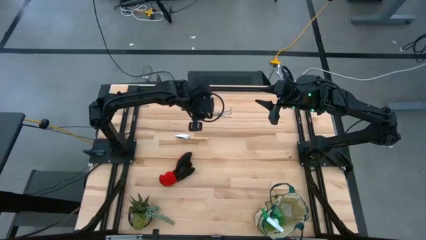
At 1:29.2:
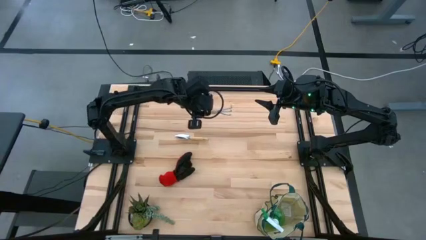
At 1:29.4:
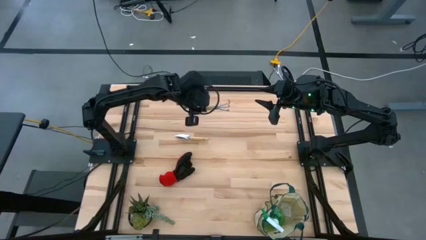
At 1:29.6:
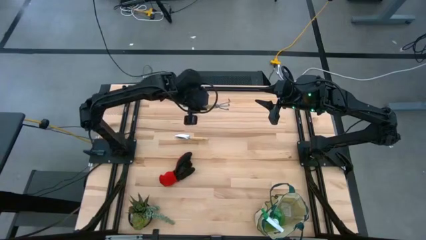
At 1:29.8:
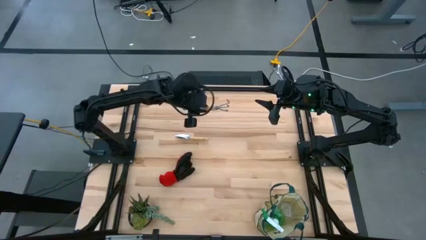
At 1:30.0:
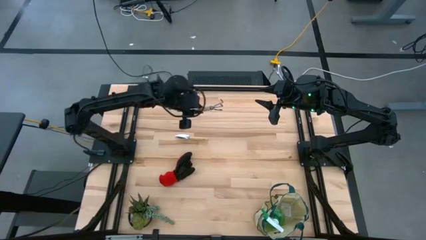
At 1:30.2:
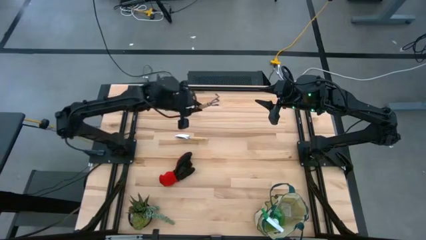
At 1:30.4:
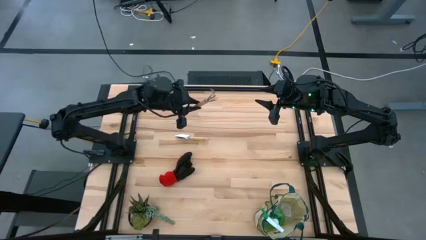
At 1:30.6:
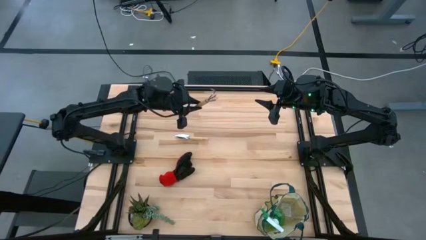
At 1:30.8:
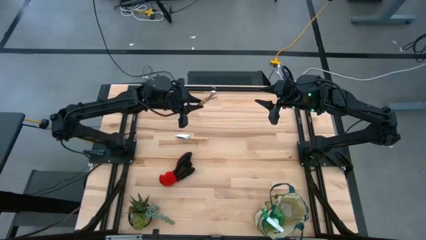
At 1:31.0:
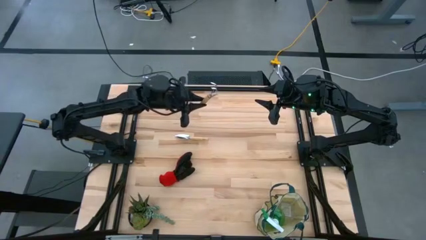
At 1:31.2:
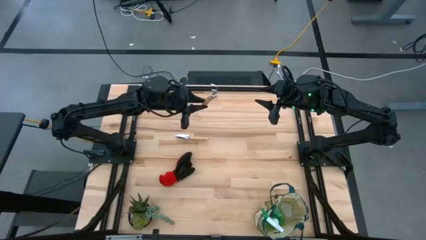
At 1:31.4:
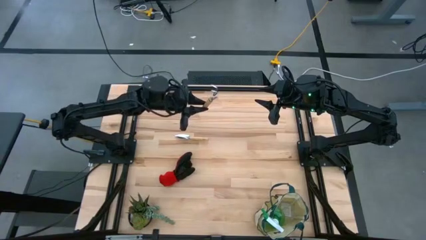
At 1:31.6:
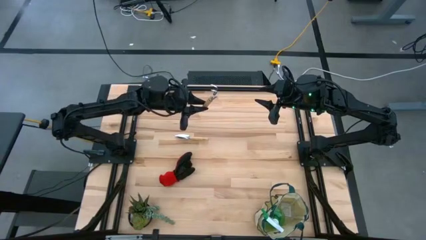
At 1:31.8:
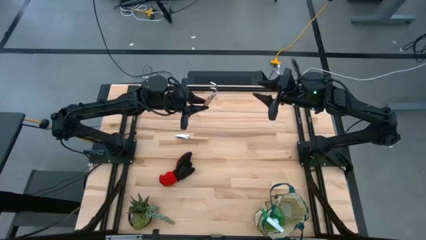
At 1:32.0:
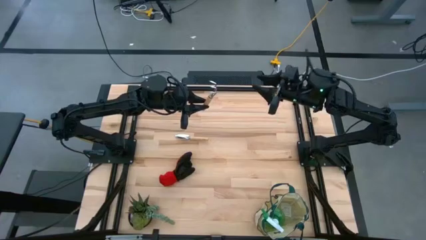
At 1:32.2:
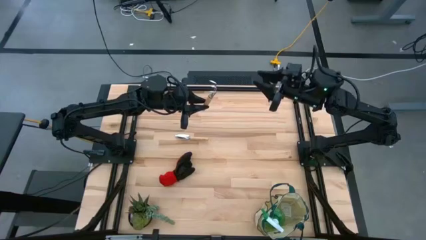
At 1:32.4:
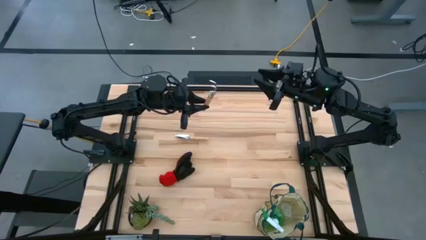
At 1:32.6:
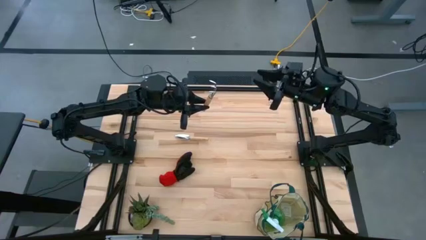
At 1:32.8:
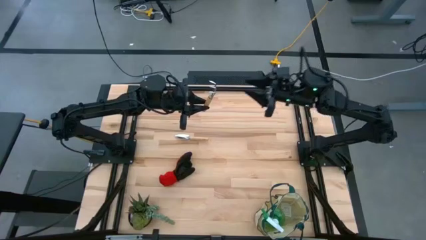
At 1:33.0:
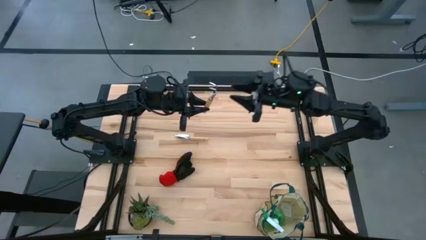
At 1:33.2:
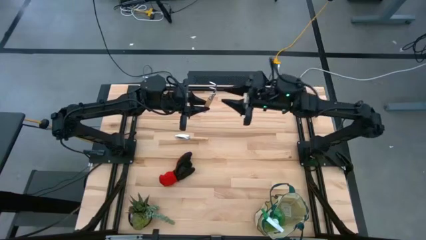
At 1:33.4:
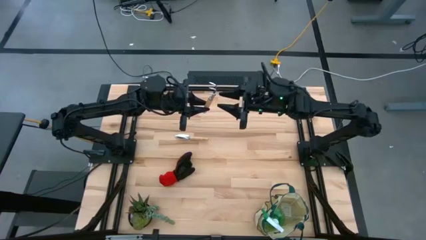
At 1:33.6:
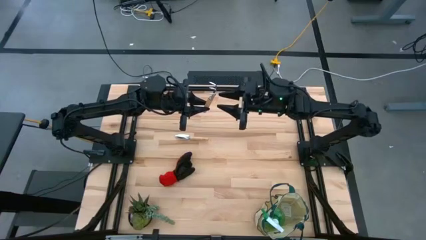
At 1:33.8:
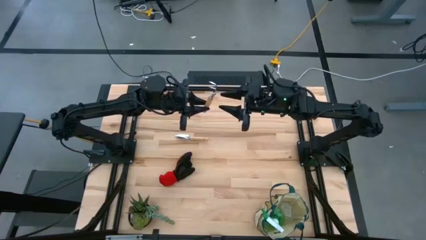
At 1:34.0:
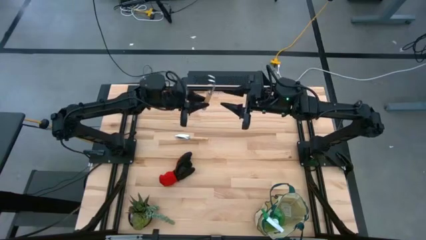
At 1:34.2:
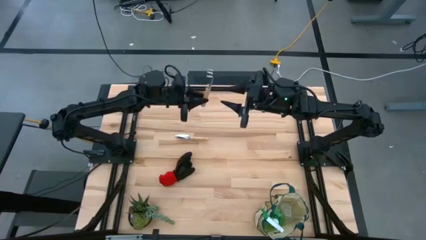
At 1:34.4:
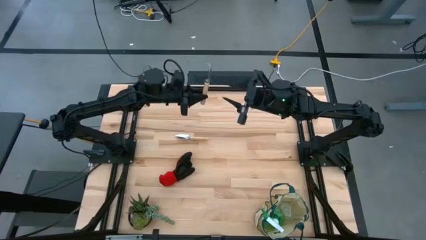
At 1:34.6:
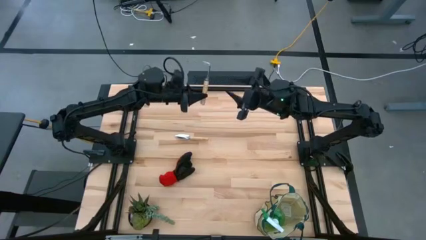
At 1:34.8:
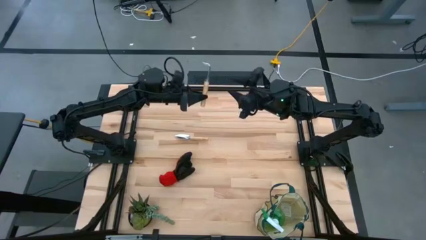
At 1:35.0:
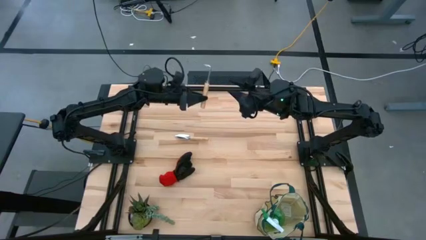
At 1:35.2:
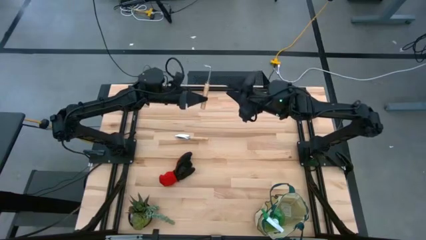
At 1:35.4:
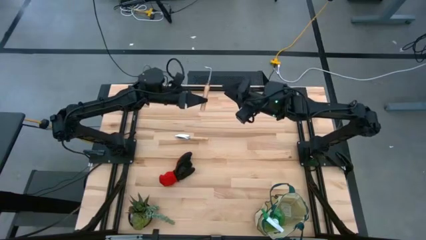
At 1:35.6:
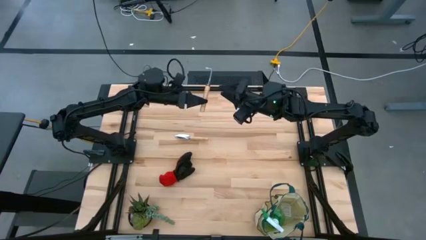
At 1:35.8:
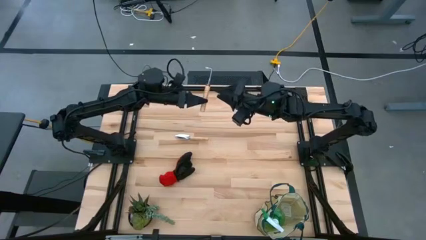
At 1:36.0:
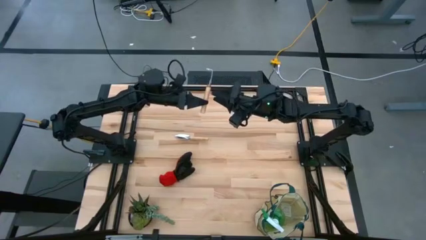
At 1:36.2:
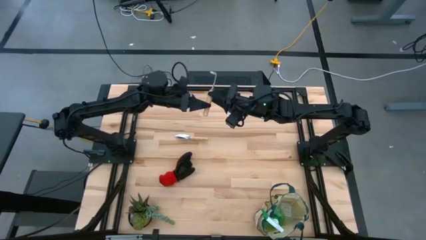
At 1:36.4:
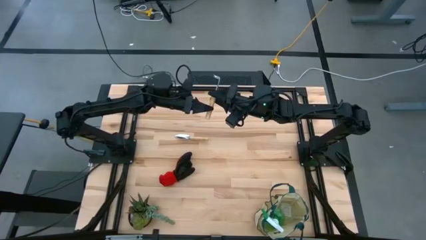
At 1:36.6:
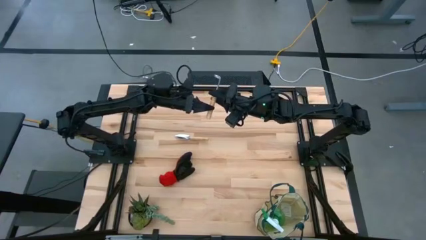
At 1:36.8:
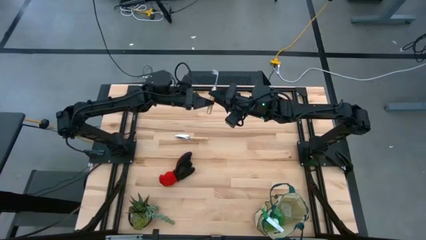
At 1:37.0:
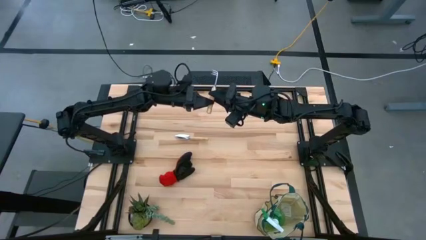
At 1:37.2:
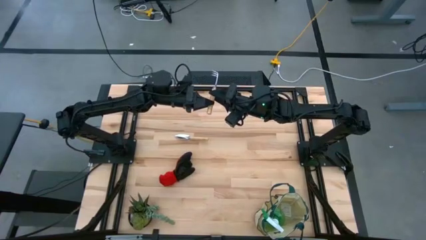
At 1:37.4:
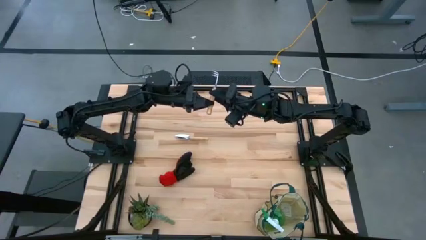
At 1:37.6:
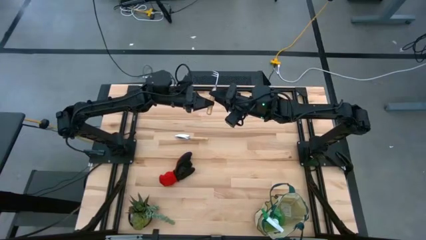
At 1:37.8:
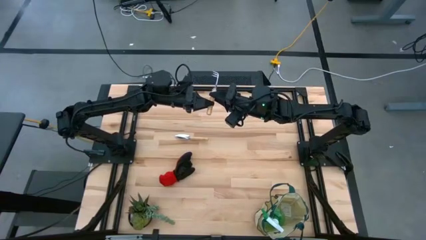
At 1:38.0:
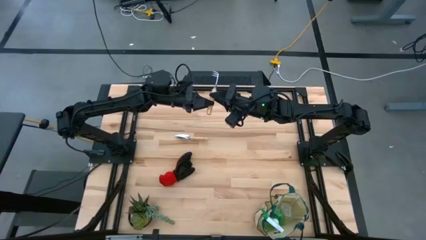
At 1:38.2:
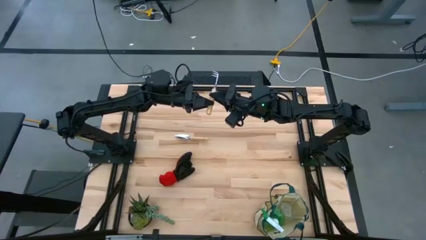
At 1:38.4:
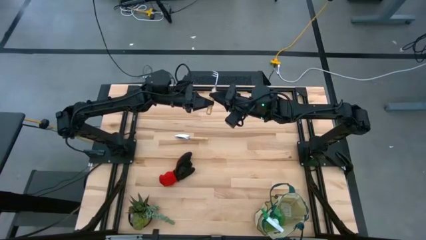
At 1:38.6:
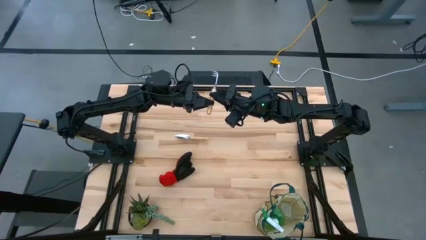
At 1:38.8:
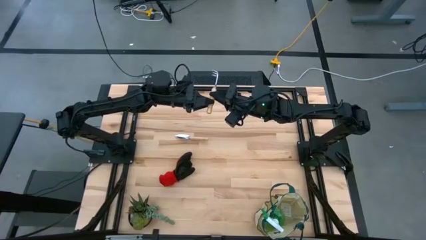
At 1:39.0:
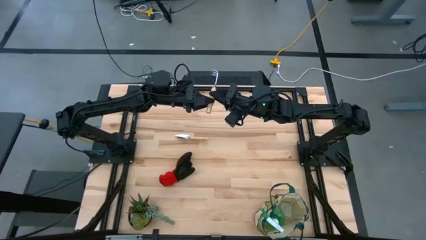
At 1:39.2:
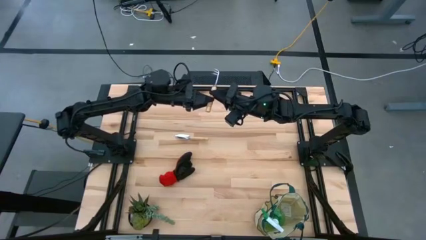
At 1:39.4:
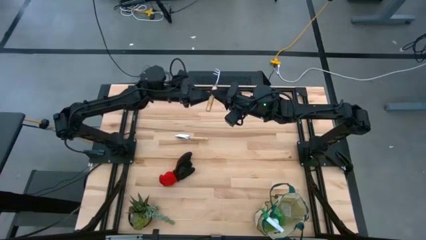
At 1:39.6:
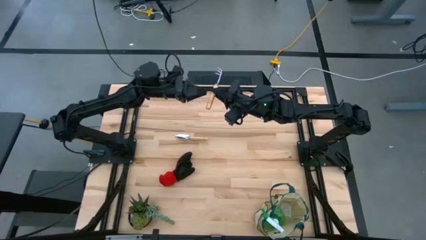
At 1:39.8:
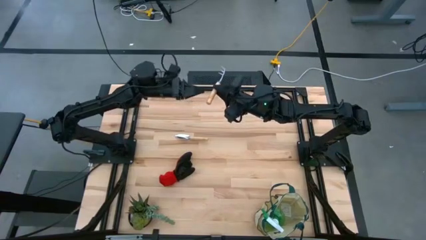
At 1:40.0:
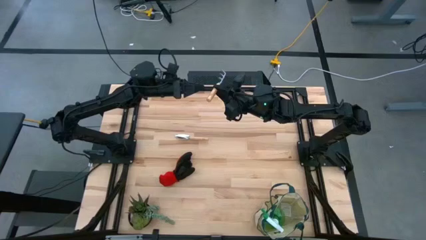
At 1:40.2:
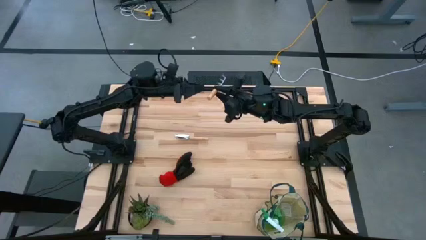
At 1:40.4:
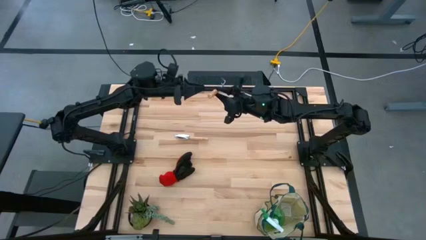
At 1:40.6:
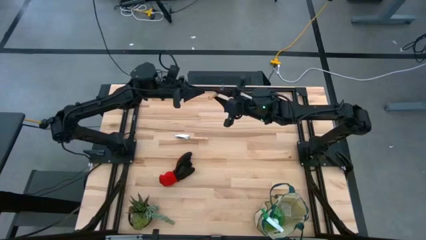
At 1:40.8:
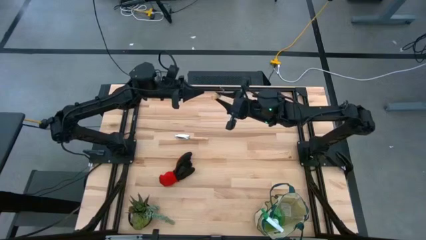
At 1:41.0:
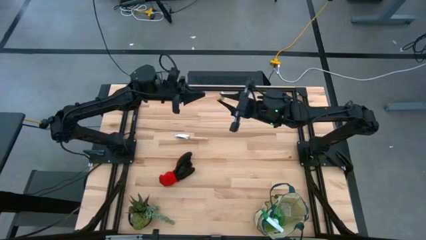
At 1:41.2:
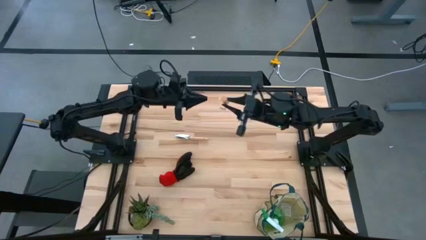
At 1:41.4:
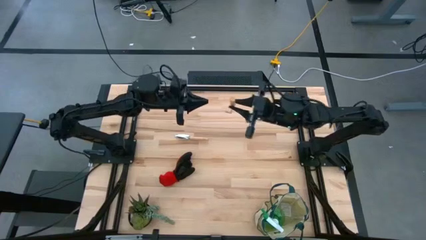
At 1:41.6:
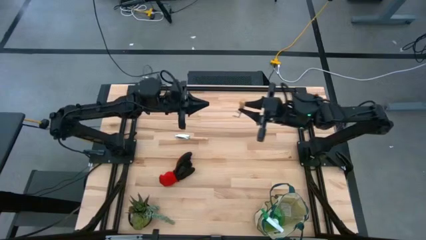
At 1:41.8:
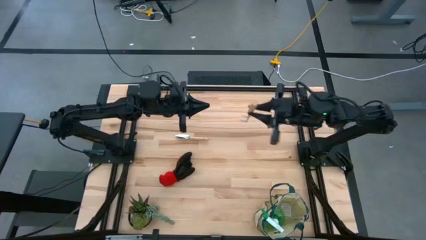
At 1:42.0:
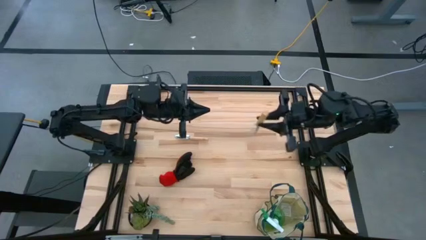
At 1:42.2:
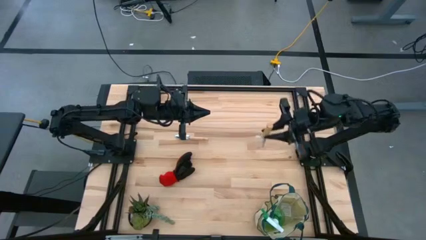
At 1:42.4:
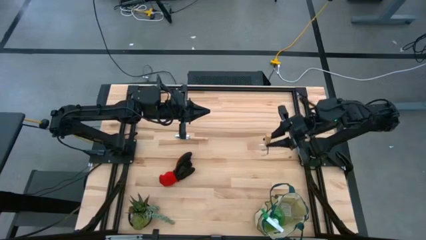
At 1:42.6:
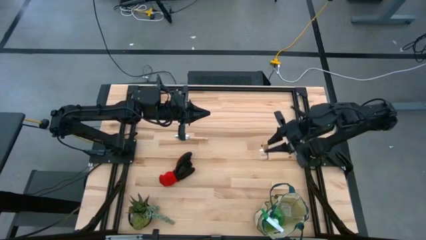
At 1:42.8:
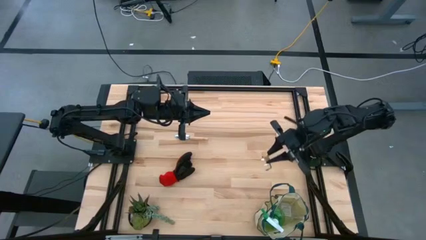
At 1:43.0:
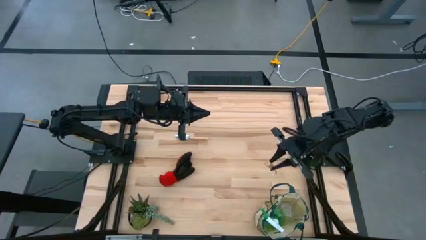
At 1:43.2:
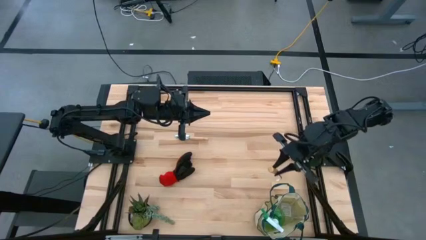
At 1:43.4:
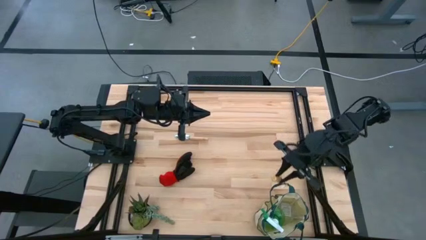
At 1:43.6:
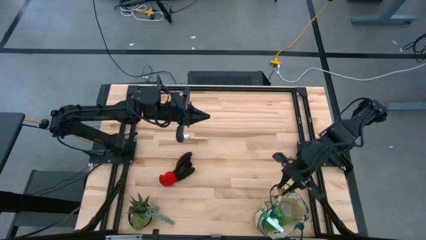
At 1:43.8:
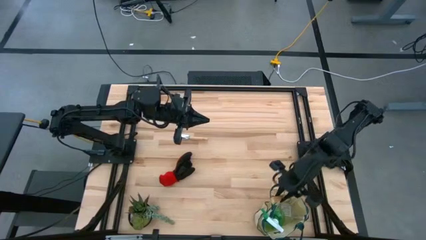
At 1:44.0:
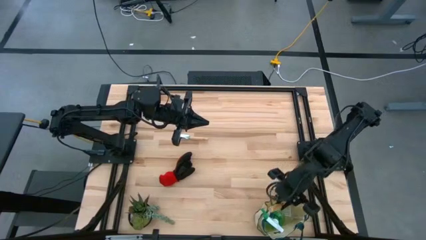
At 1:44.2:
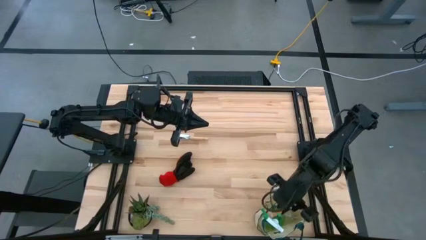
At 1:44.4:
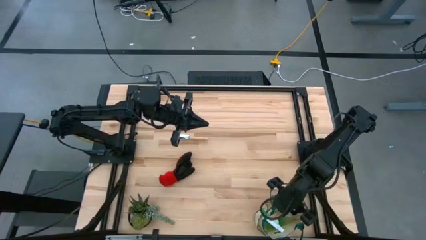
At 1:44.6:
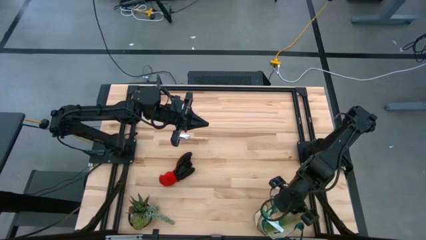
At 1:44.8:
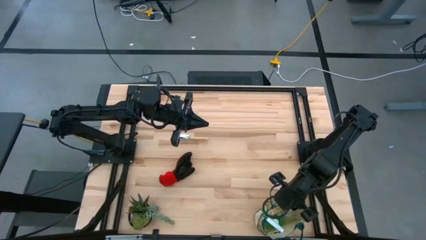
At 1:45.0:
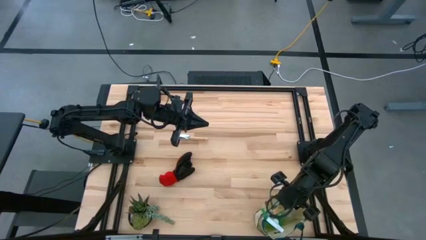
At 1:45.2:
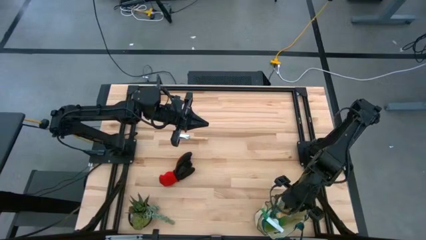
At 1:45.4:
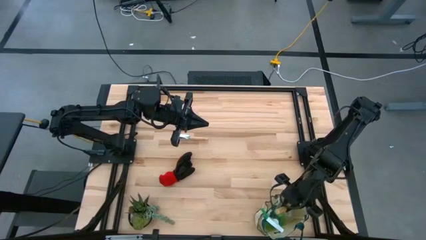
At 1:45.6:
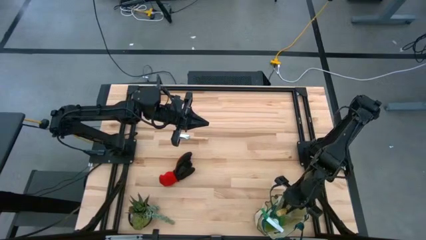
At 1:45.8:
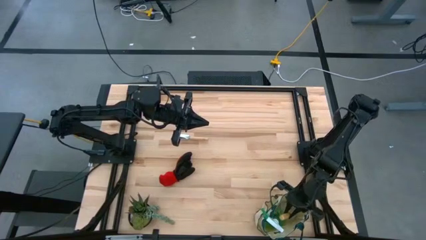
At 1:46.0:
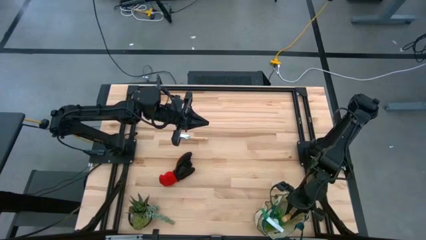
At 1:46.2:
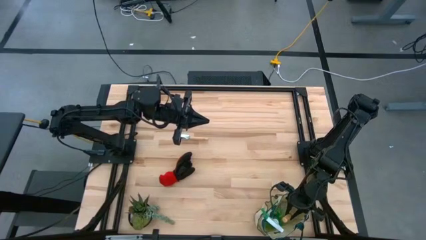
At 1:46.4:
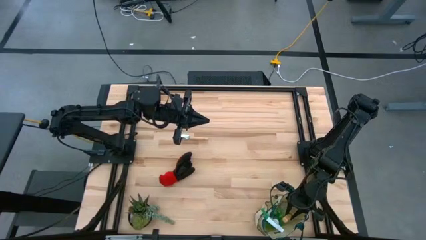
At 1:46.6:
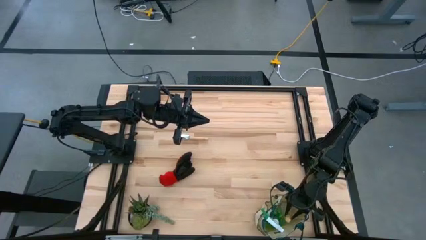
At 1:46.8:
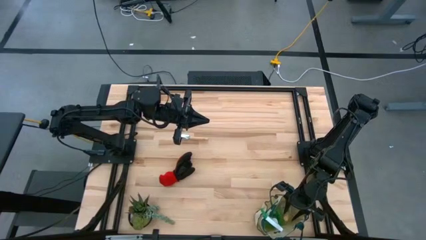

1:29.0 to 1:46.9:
Task: Pick & Place Garden tools in Gardening bag
Put the brown hand rake into the gardening bag
